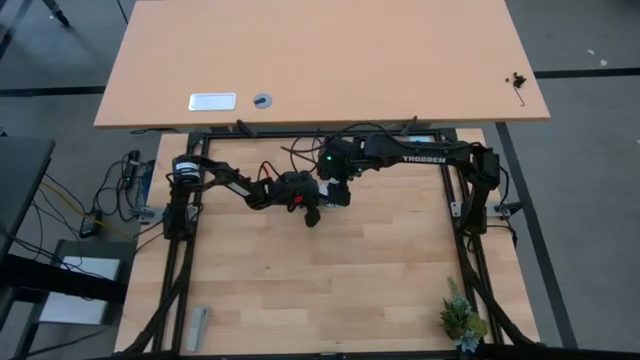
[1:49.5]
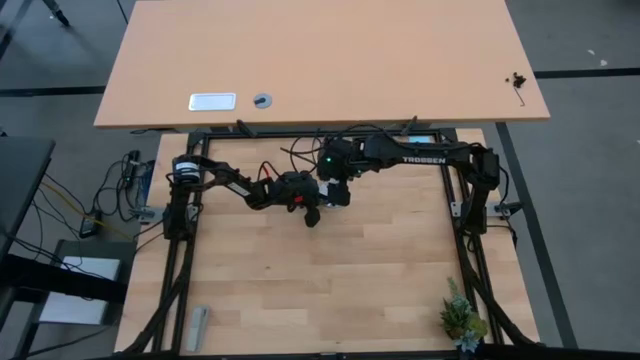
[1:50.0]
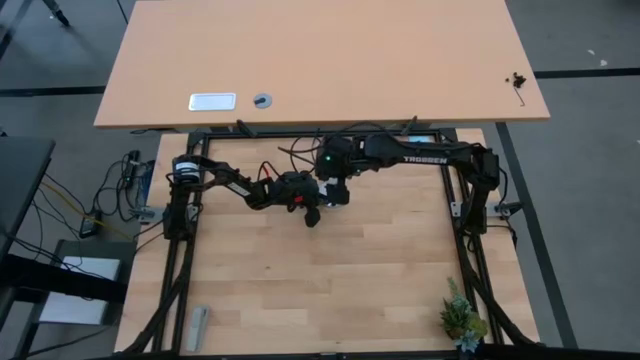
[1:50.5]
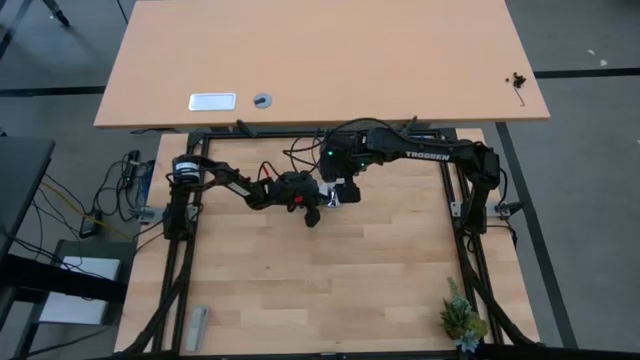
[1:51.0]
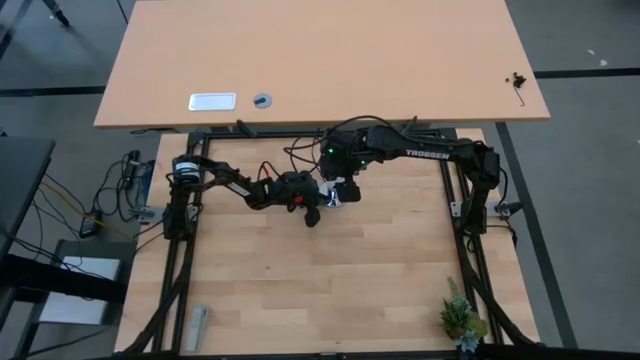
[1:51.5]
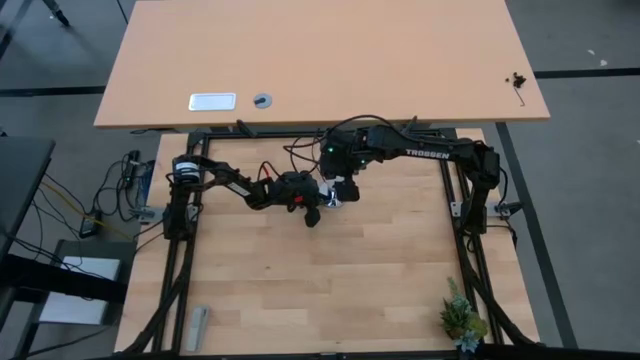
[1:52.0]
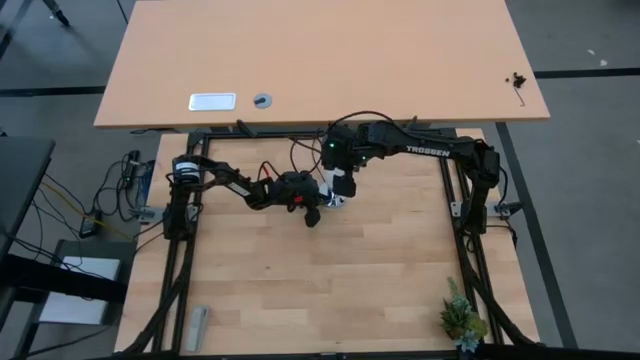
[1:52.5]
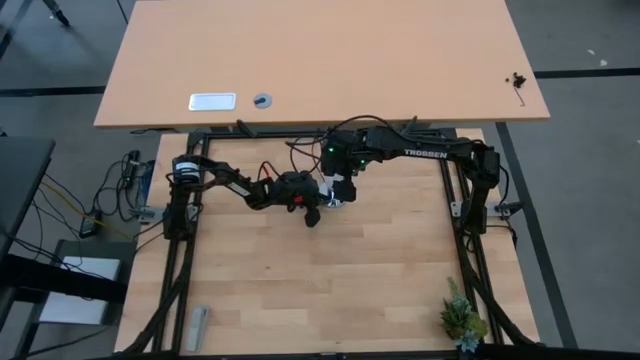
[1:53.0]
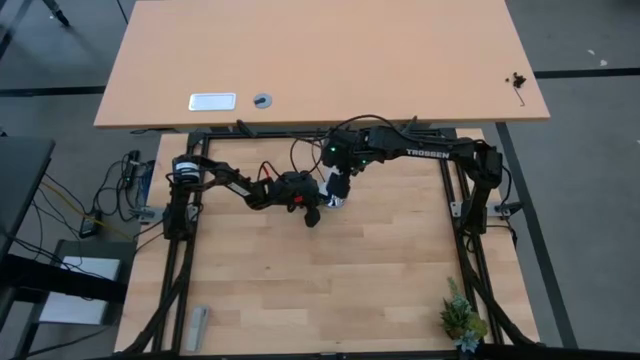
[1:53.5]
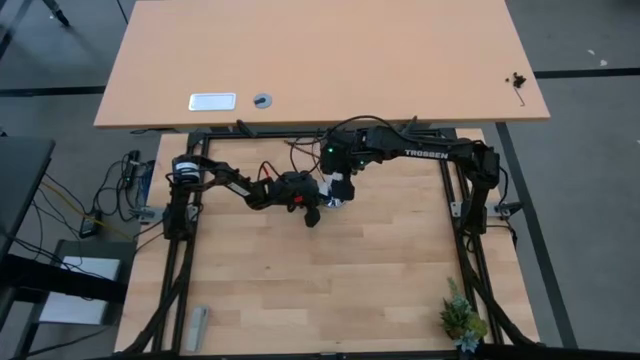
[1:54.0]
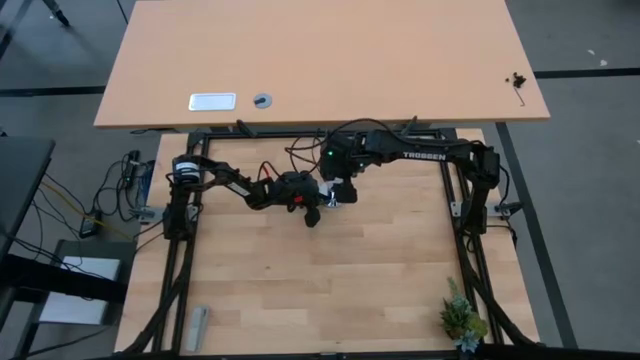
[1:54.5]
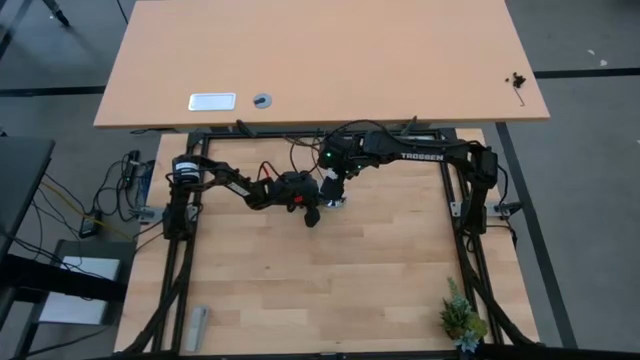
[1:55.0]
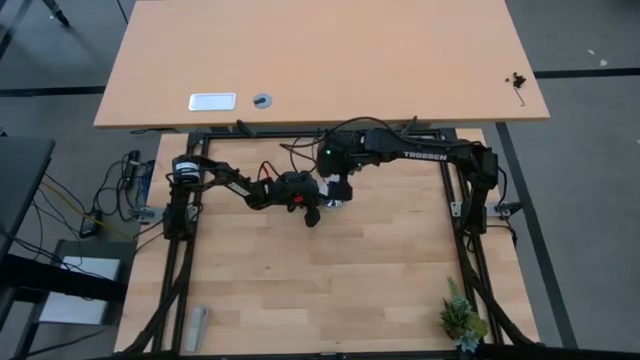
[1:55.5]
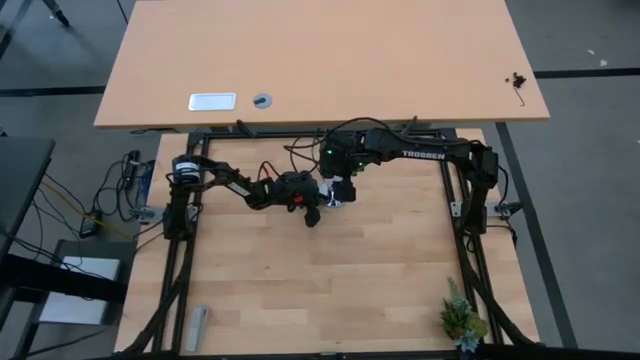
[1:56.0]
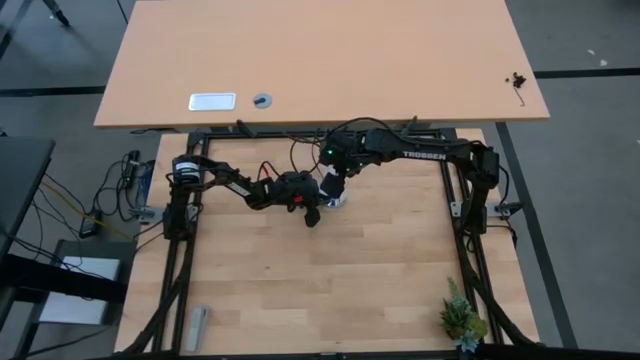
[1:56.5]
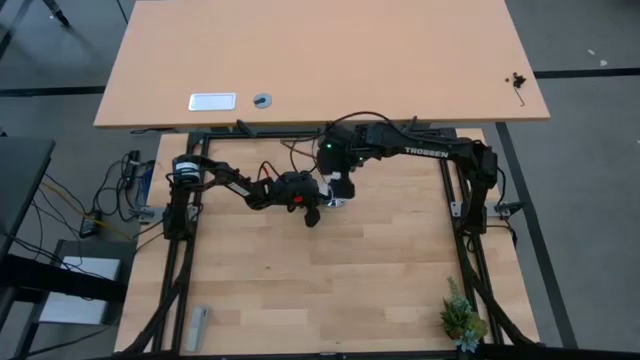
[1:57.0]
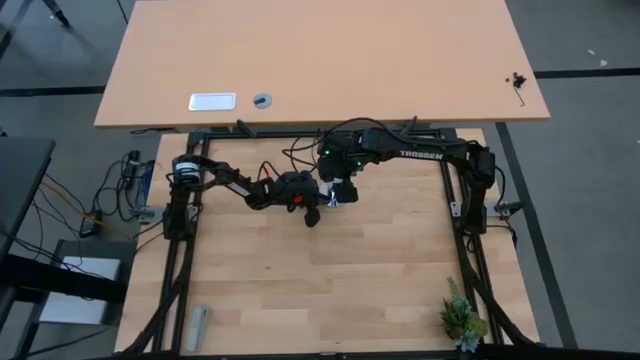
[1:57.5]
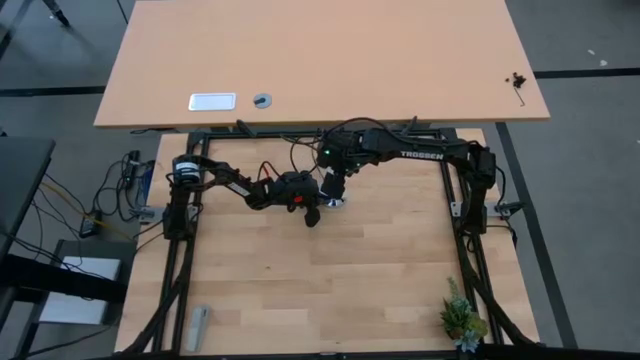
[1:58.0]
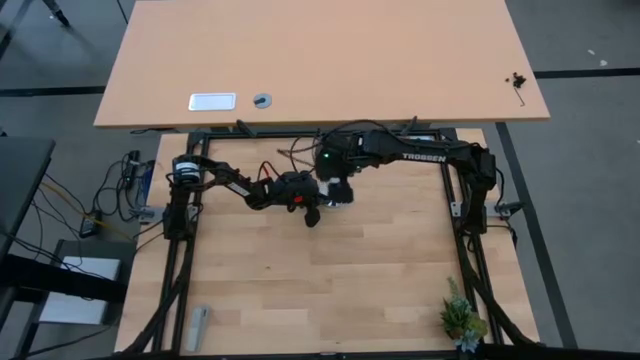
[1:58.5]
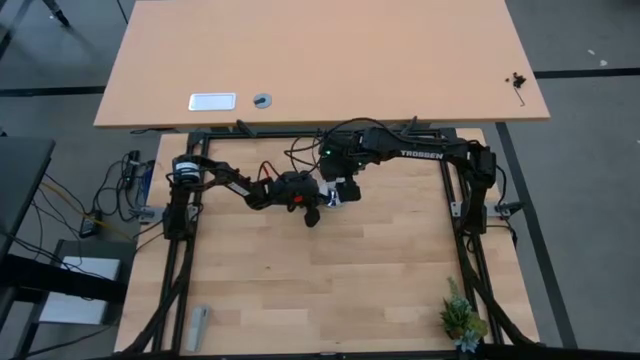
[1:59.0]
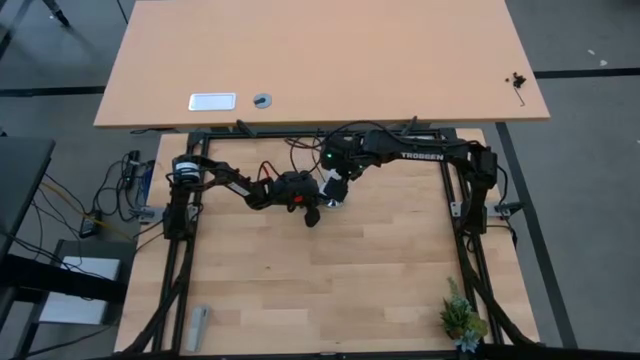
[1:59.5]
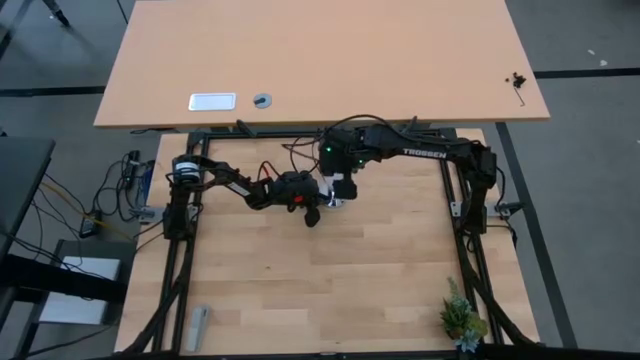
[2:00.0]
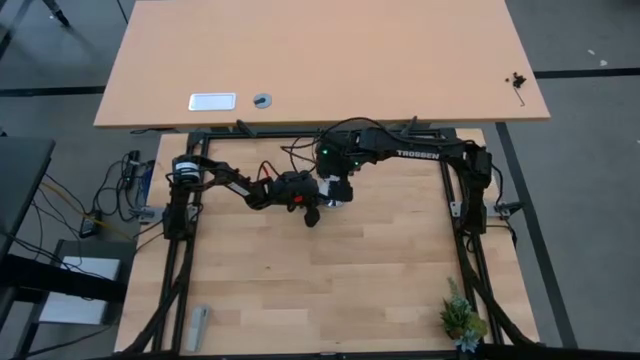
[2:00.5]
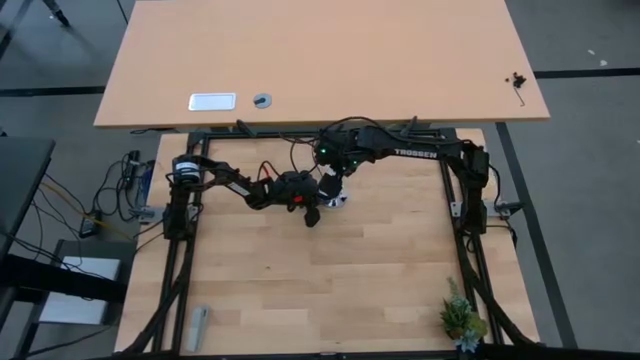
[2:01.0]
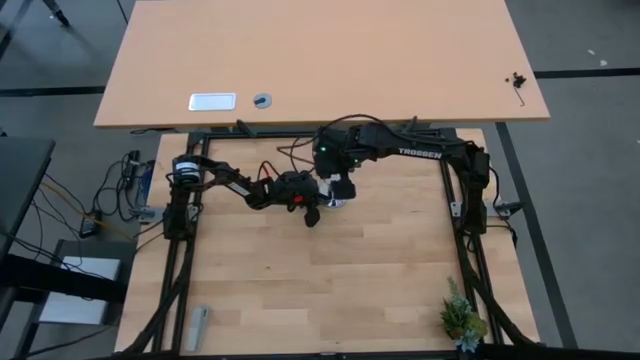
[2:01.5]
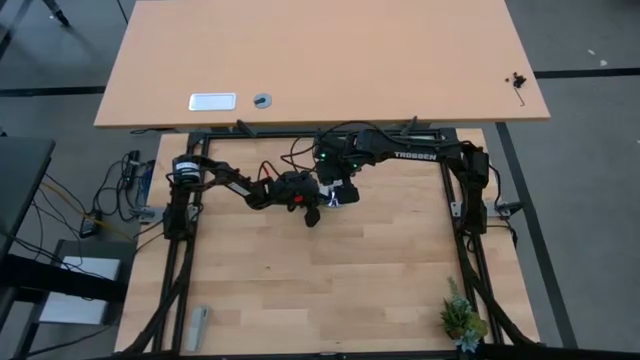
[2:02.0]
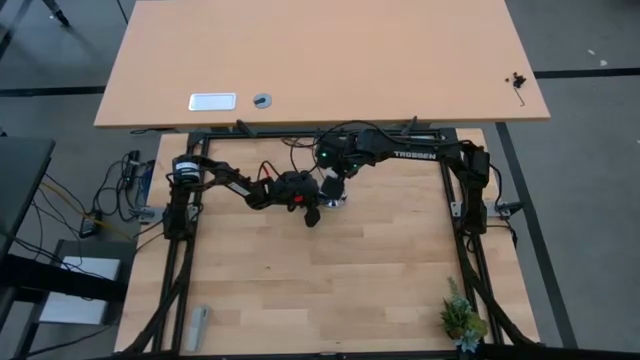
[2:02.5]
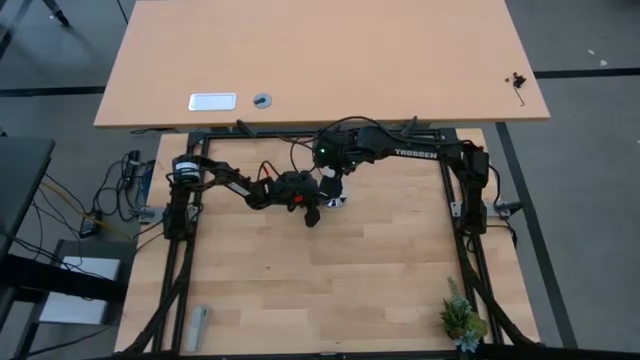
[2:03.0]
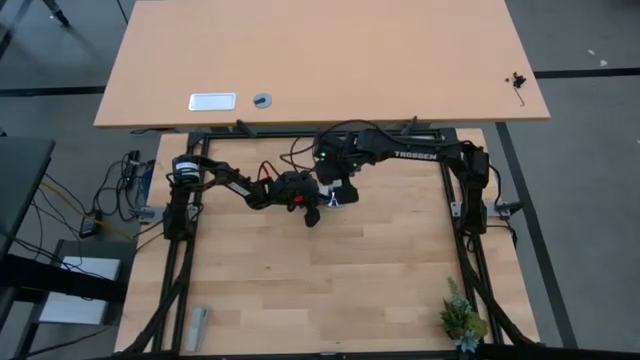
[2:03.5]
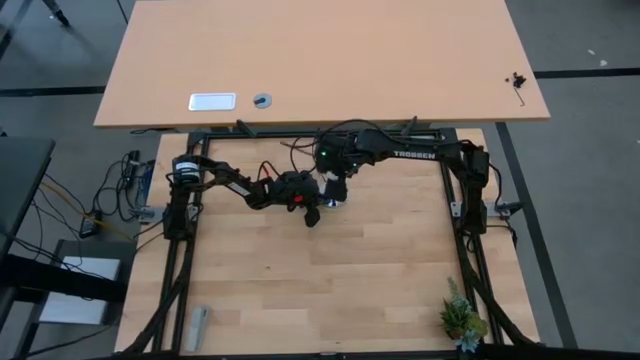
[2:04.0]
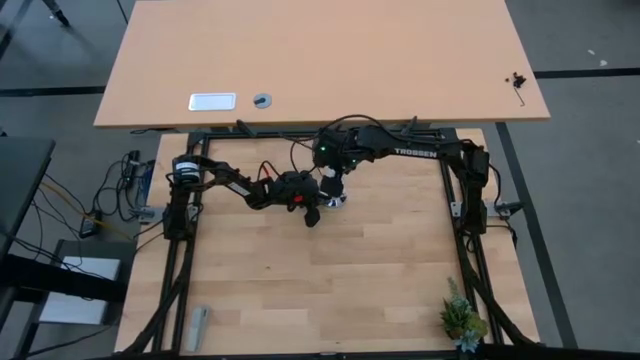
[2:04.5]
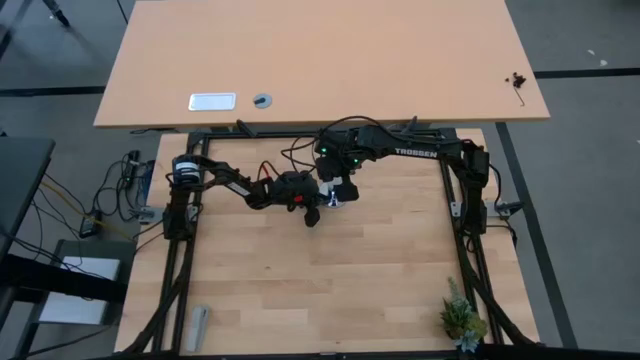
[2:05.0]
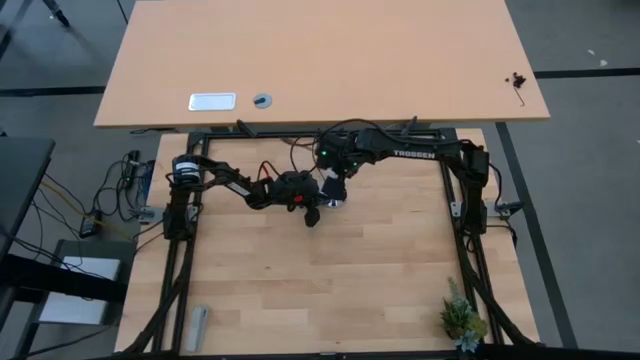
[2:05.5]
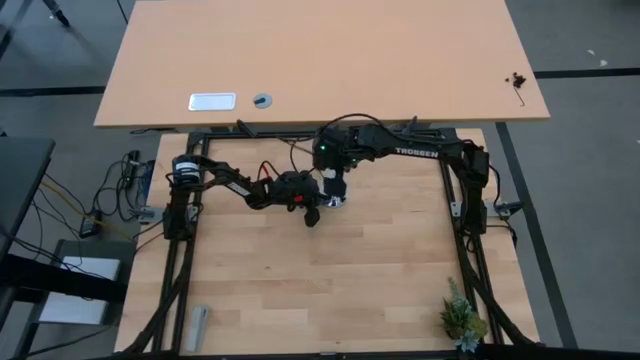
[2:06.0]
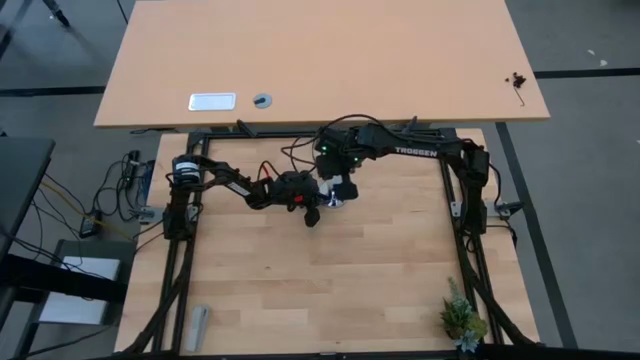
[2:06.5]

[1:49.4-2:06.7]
Task: Screw lightbulb
Insert the lightbulb into the lamp

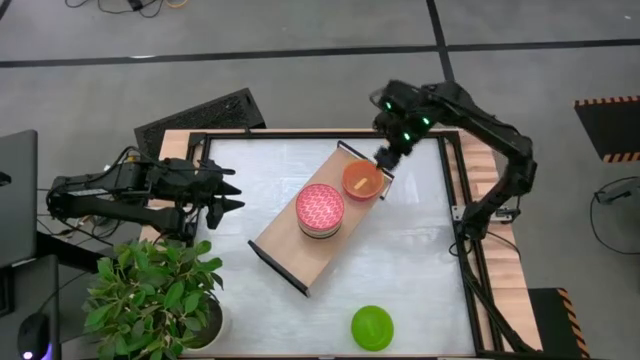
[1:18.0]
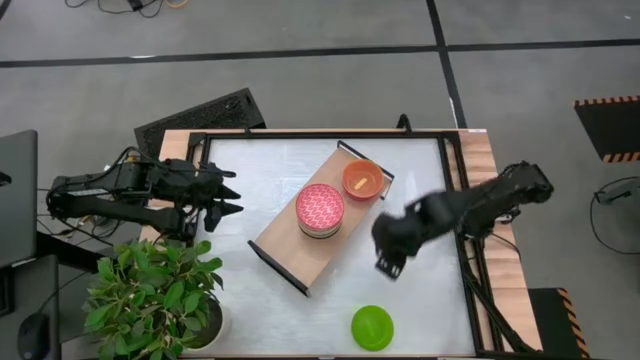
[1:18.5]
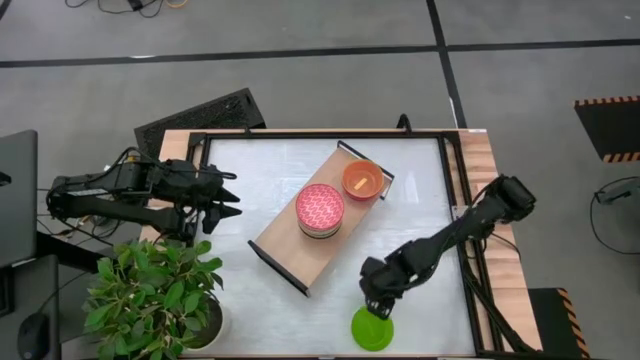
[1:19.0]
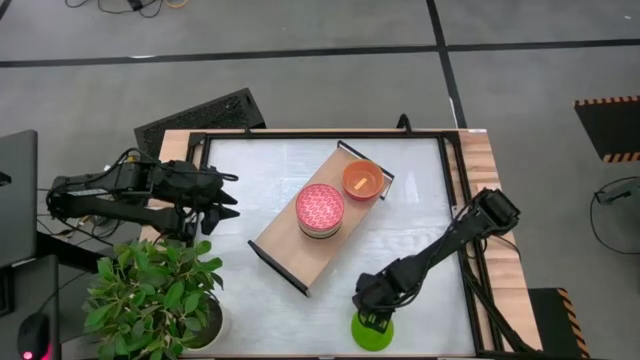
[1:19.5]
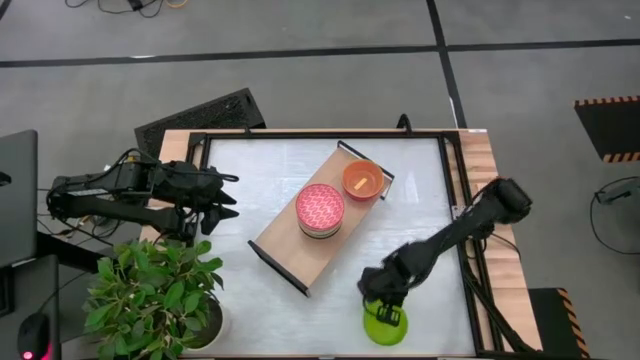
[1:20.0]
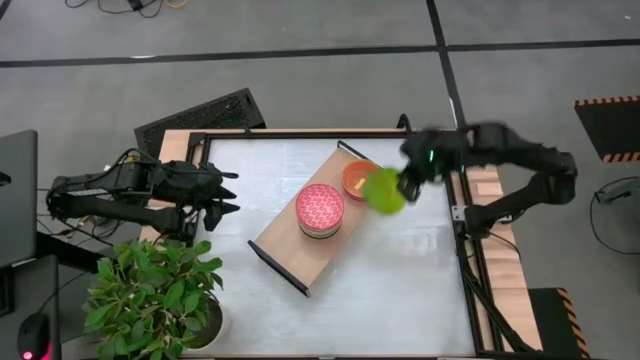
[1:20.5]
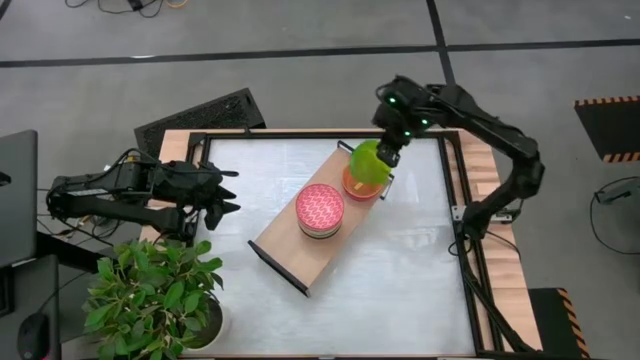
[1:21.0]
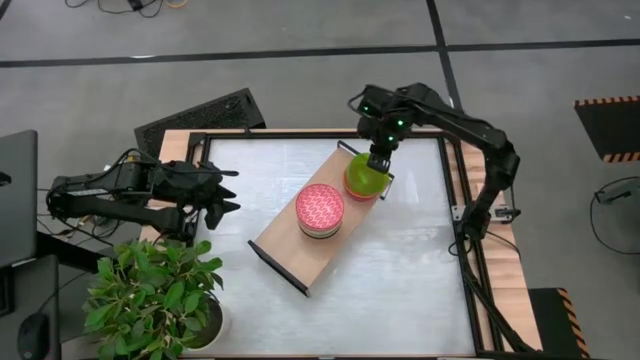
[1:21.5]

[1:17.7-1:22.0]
Task: Place and stack bowls onto a shelf
Stack the green bowl on top of the yellow bowl on the shelf
